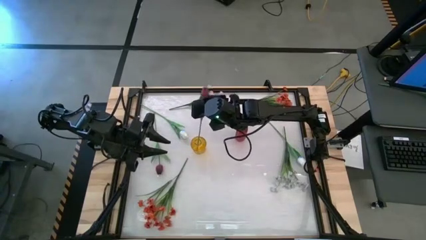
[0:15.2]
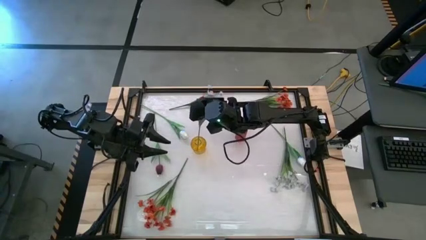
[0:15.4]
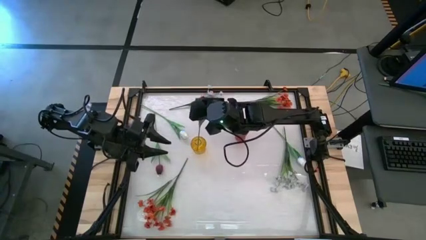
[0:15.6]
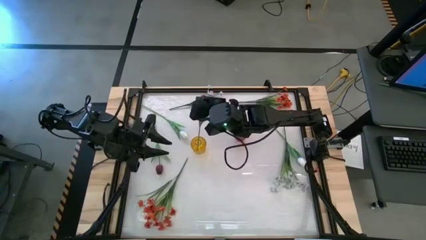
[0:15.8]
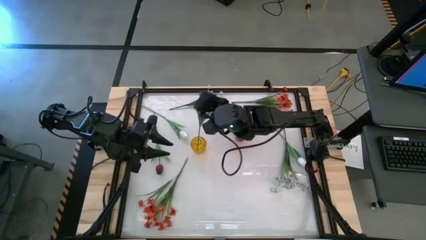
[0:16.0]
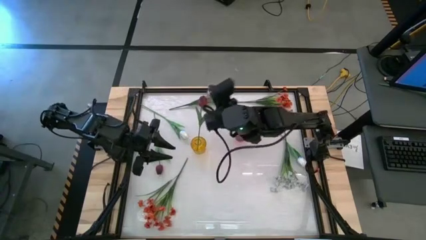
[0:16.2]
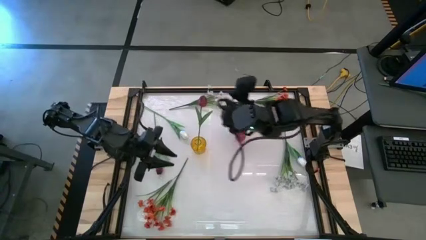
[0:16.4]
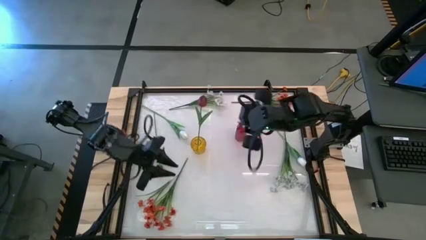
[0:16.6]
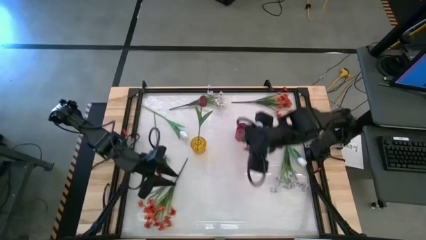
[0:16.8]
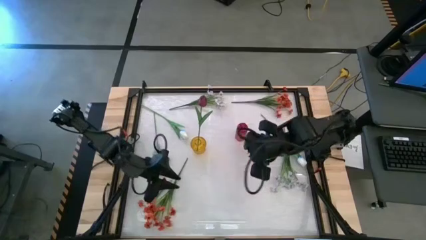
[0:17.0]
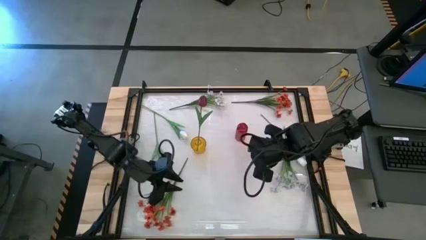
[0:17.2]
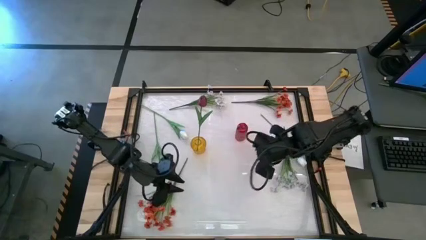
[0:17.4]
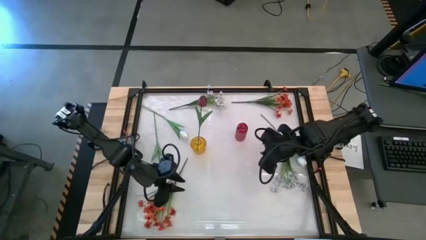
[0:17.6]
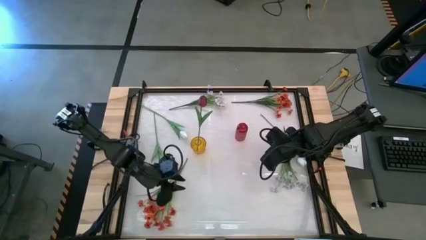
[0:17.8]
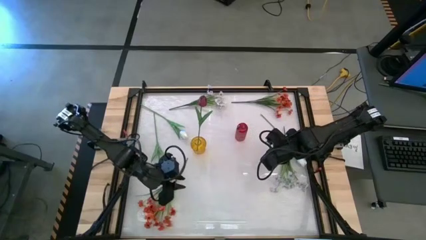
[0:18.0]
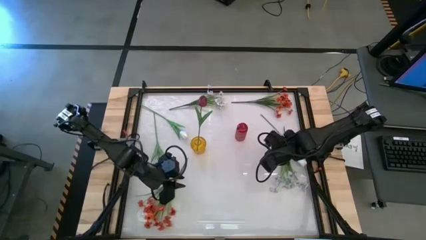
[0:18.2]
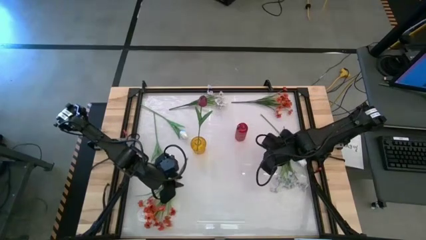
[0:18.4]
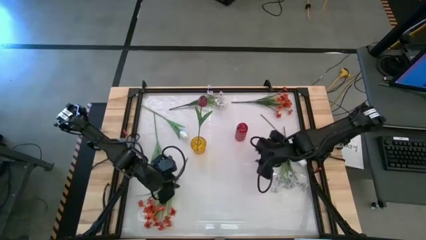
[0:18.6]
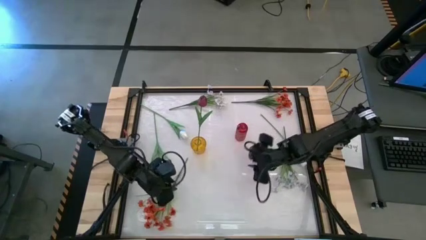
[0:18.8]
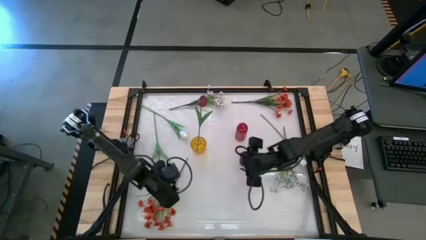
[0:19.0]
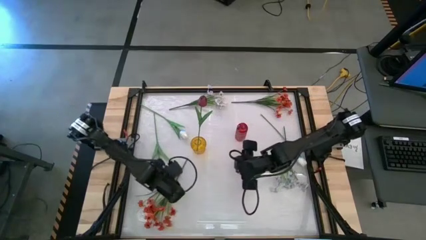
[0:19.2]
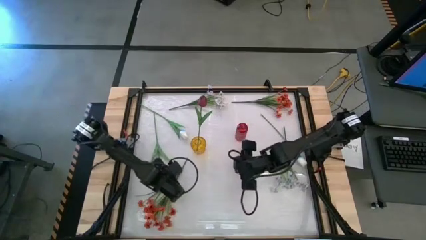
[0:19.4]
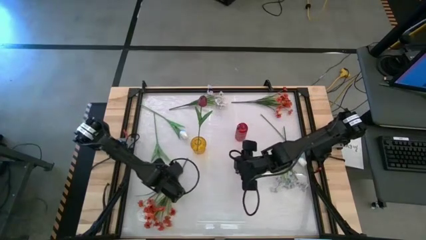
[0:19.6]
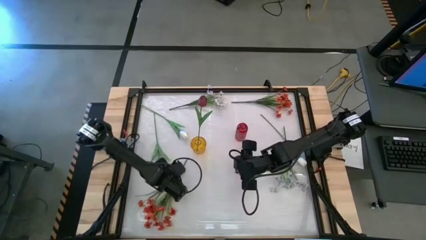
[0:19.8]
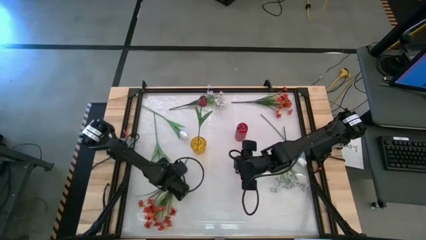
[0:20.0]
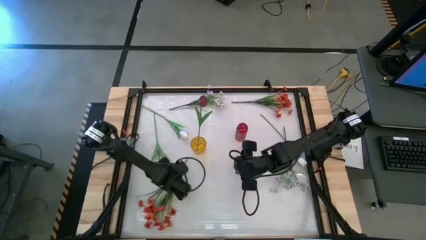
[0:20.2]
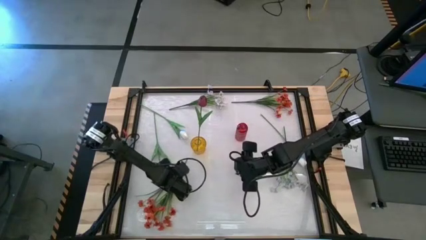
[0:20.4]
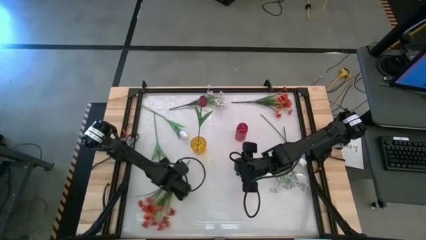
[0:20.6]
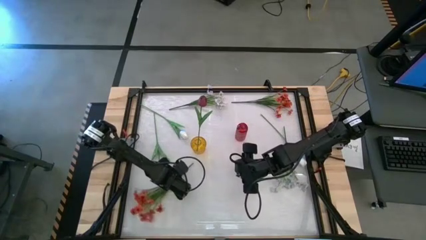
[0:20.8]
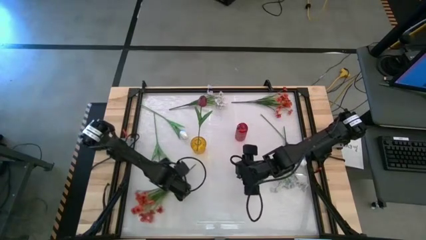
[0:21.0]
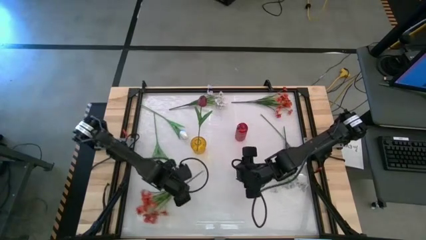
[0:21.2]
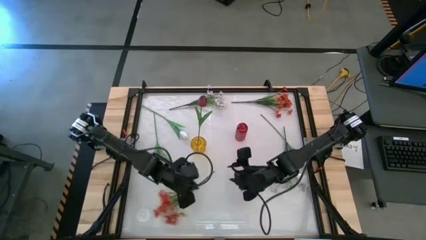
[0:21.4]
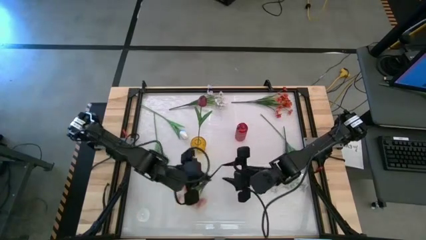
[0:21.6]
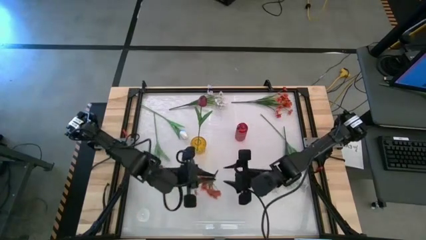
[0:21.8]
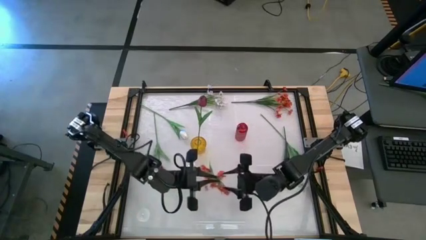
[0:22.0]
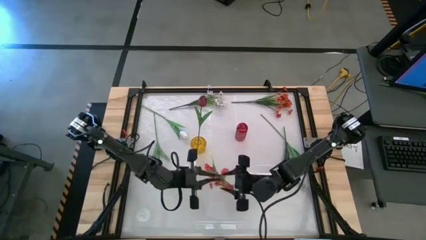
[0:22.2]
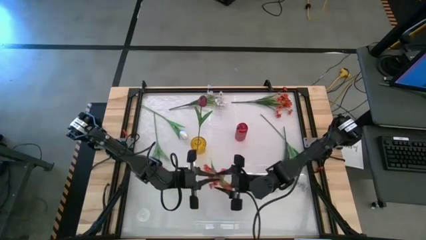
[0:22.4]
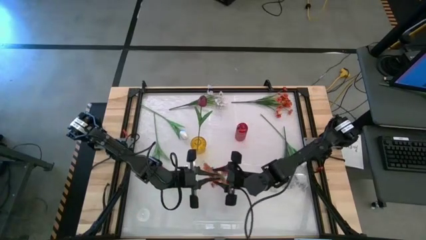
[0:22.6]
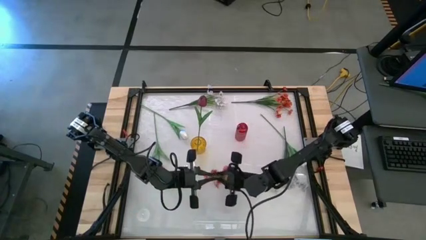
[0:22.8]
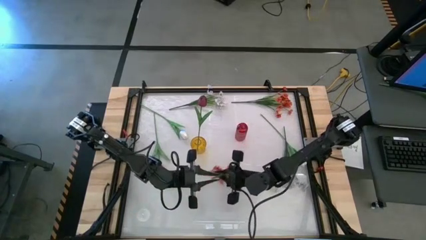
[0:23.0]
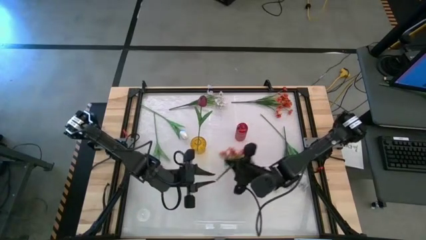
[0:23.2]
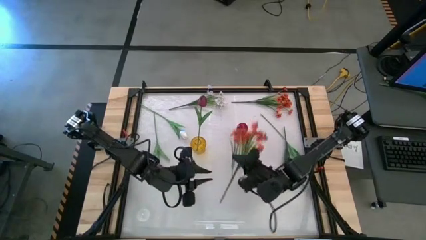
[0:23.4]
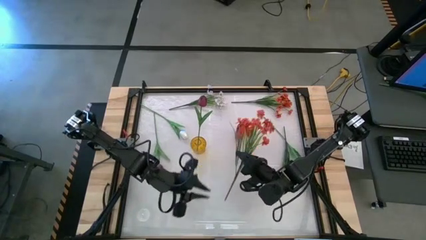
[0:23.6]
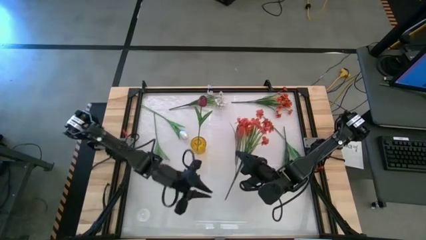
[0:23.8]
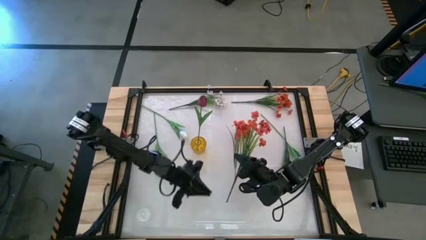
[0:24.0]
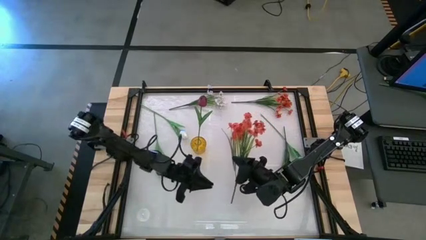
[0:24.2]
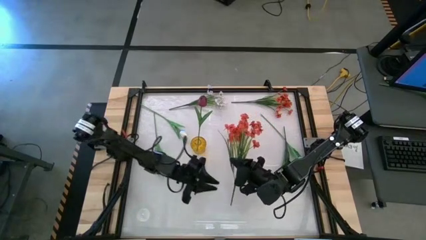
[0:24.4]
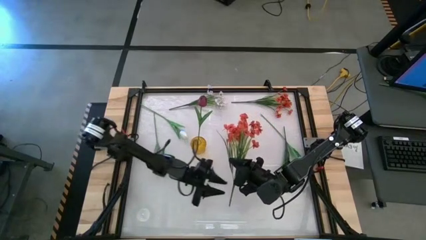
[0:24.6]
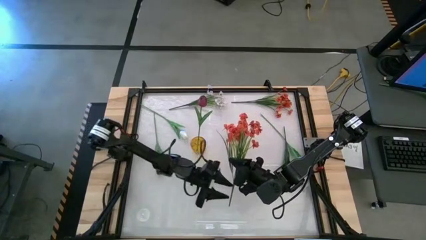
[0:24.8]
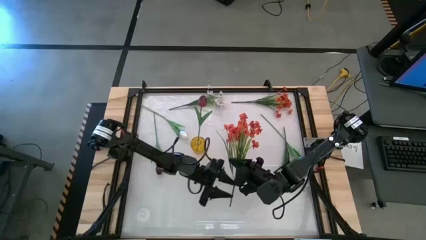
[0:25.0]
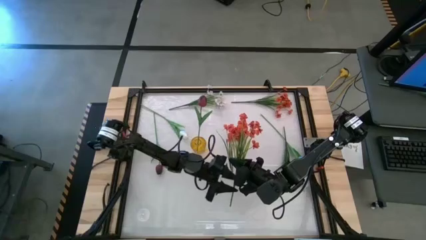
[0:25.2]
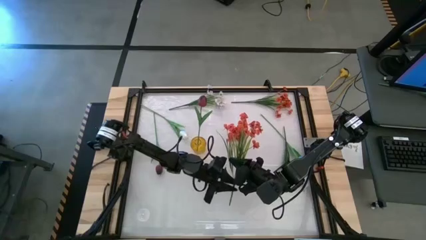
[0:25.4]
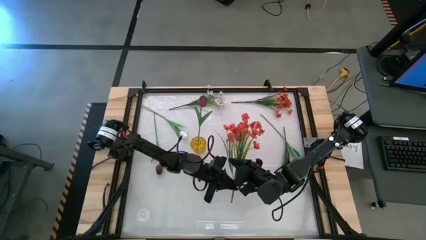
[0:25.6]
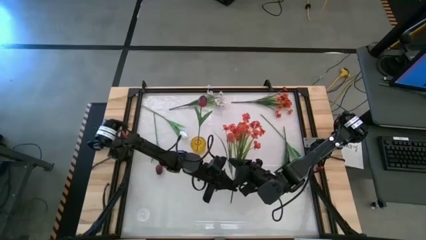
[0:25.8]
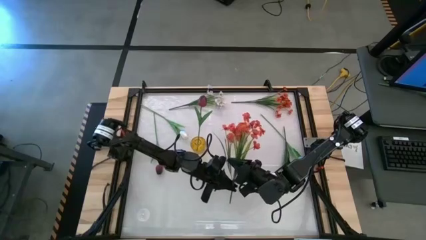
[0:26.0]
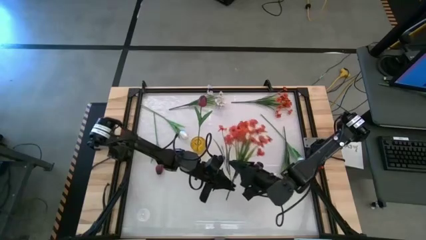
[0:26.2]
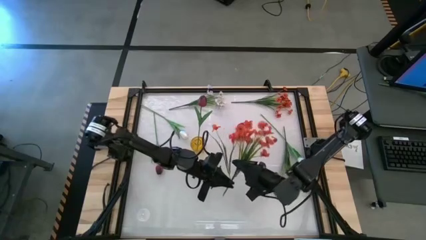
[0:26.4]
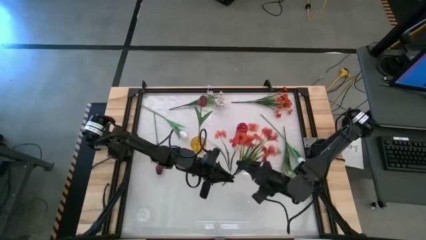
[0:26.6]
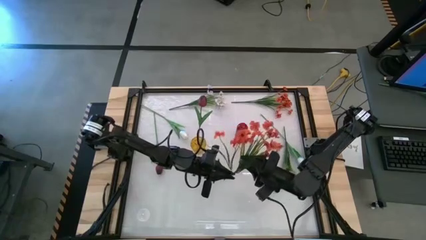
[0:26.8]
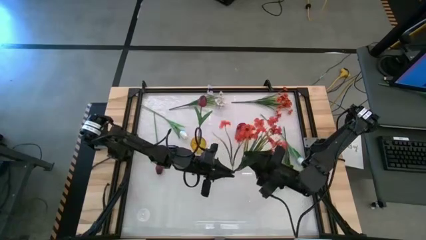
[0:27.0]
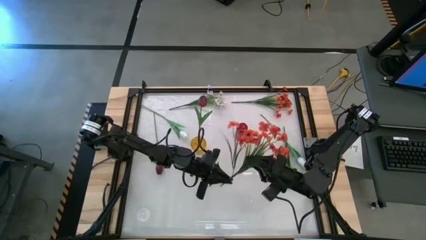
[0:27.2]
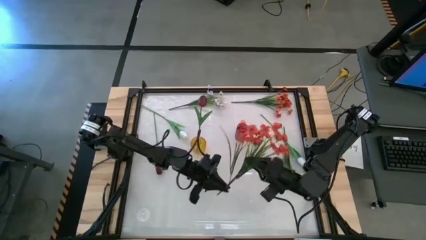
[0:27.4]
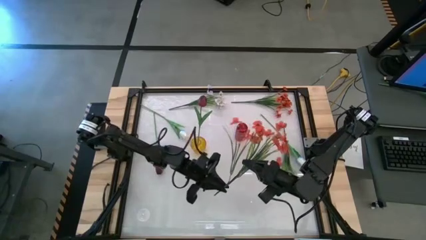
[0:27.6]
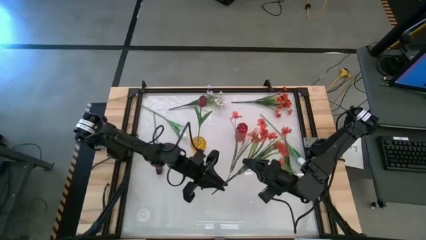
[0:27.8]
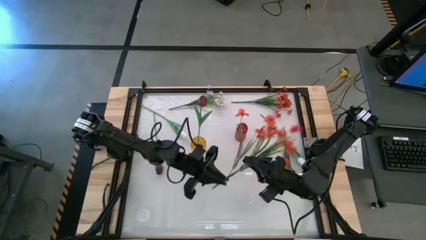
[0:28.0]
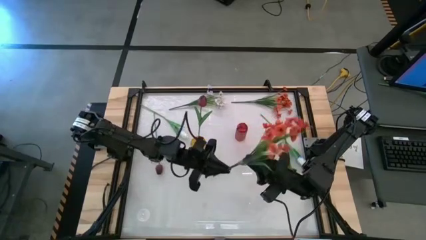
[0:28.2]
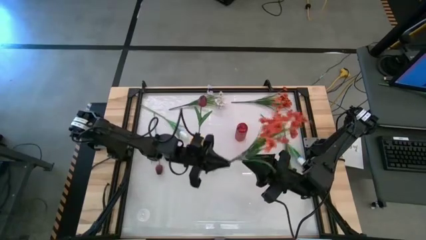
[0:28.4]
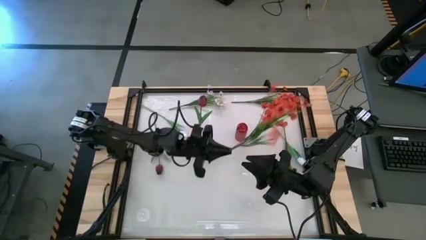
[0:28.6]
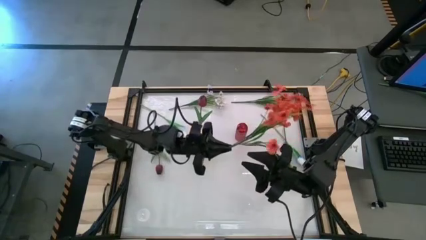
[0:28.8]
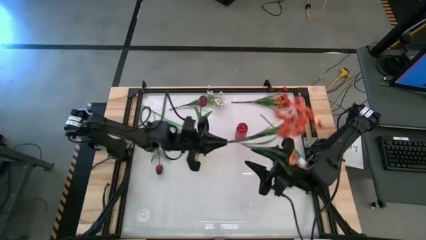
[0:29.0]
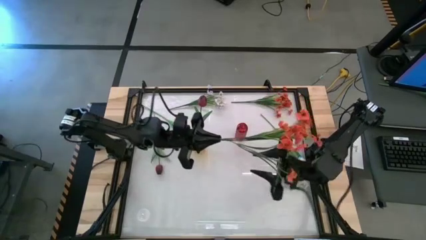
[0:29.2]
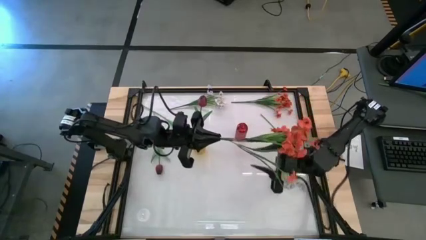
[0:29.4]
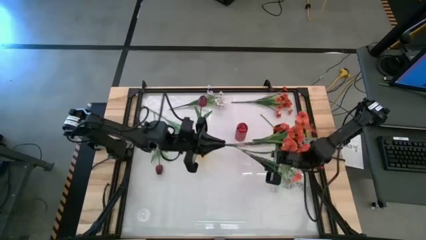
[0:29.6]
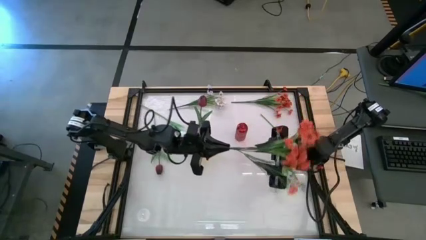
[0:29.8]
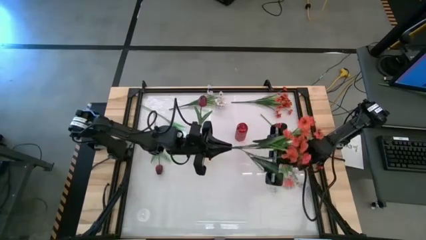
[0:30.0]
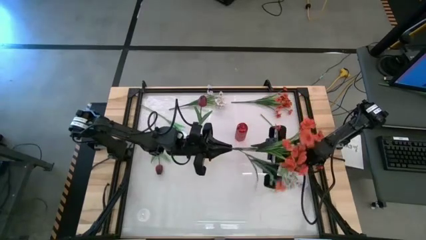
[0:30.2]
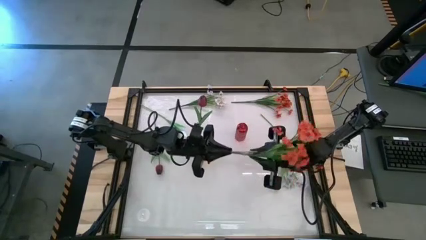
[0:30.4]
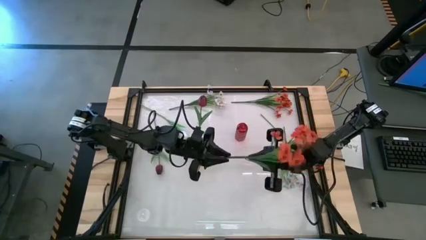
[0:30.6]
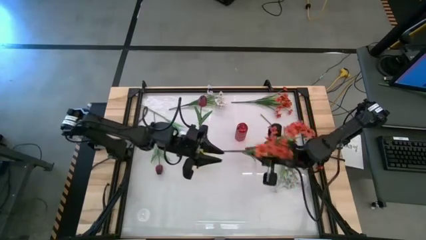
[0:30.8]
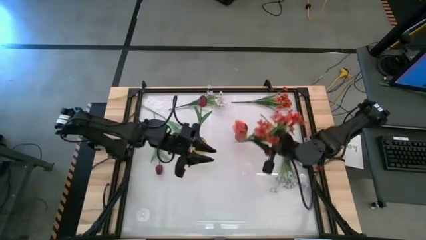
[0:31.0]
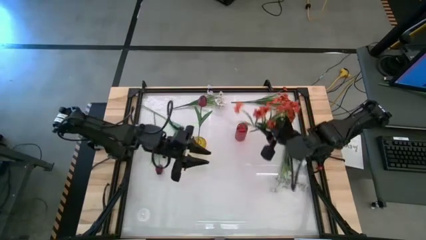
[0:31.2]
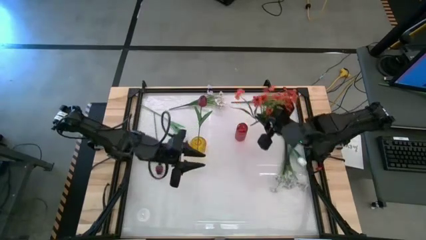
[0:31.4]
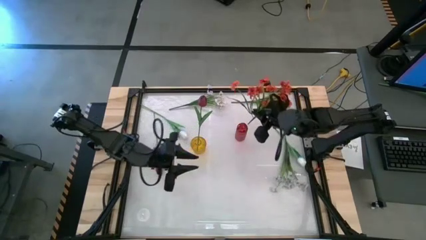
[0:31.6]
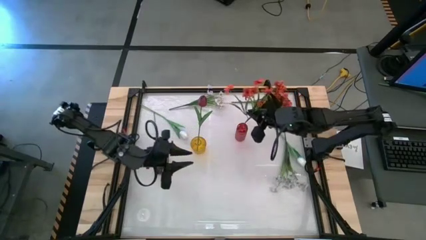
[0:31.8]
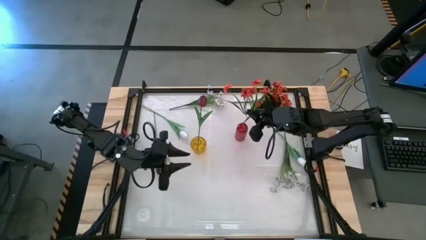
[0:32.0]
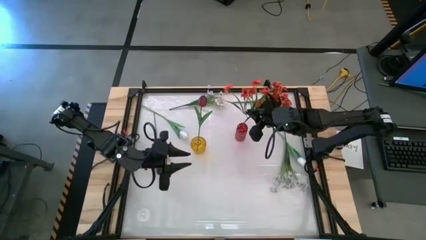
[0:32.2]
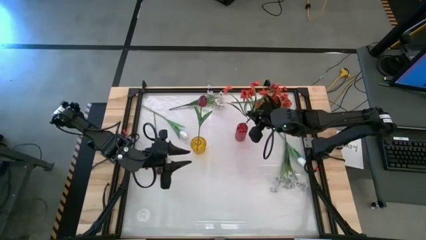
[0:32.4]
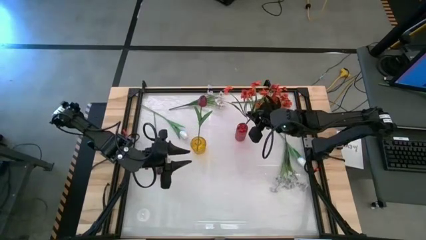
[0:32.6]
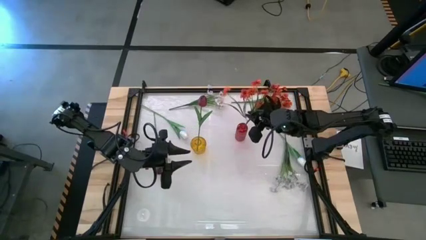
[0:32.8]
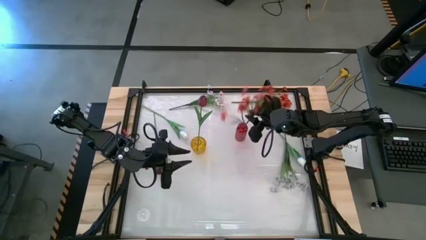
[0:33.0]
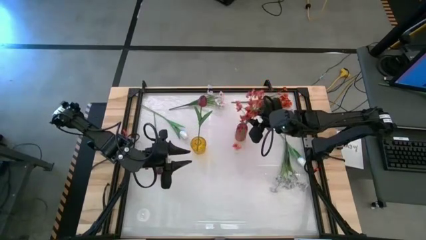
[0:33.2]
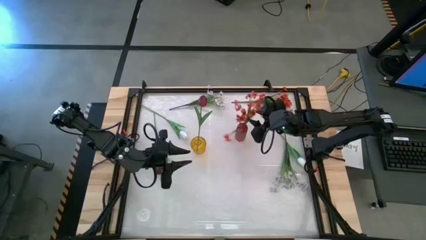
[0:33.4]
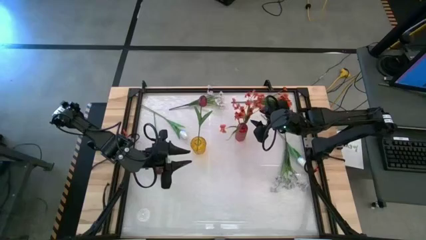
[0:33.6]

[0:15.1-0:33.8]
Task: Sort flowers into vase by color
Put the left orange flowers into the yellow flower vase
